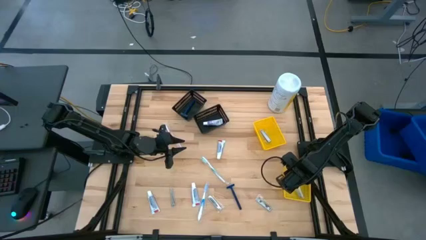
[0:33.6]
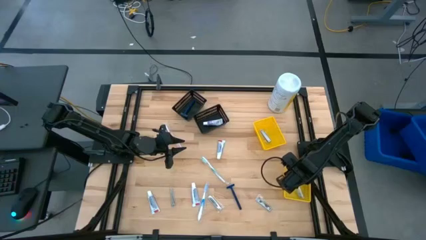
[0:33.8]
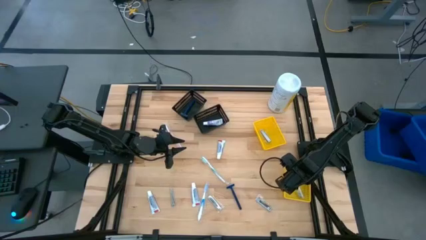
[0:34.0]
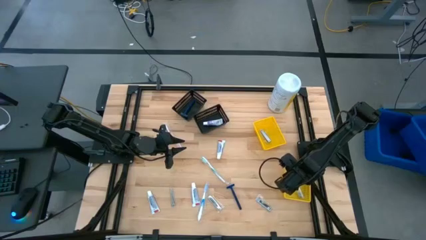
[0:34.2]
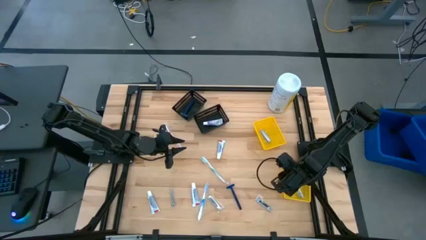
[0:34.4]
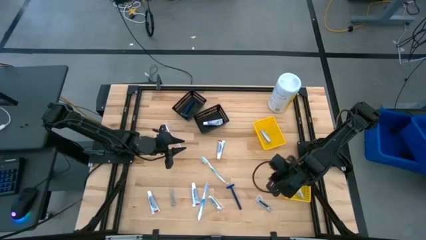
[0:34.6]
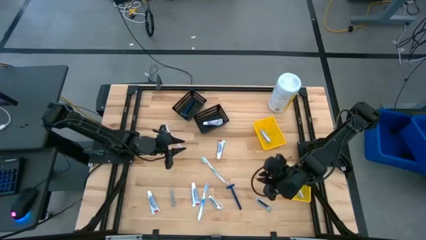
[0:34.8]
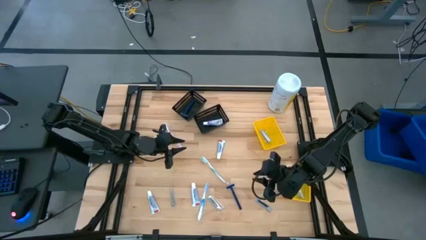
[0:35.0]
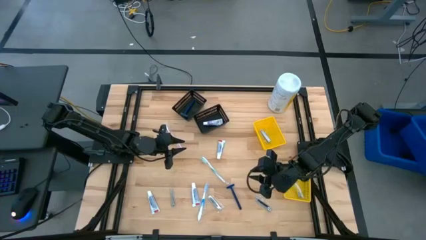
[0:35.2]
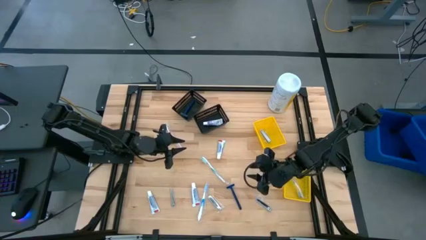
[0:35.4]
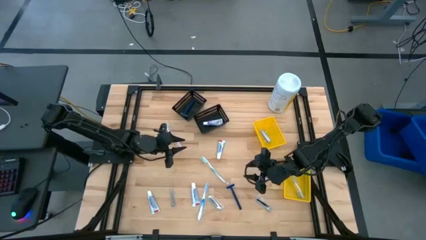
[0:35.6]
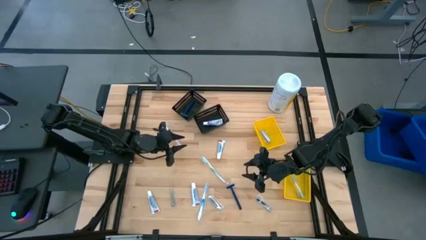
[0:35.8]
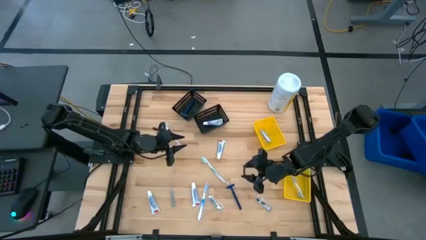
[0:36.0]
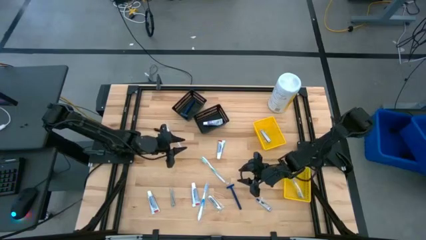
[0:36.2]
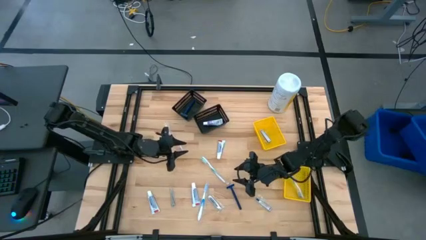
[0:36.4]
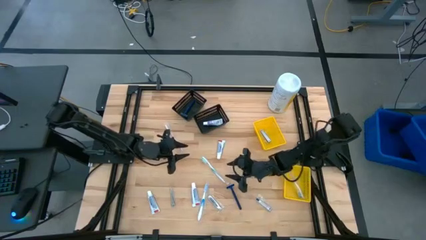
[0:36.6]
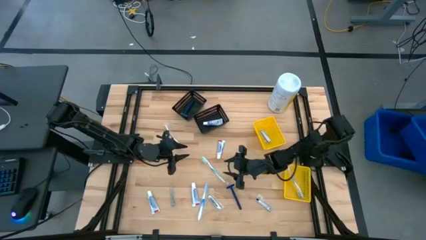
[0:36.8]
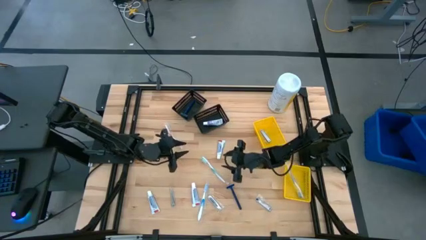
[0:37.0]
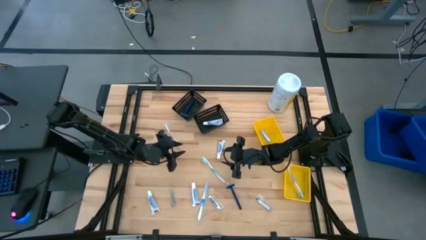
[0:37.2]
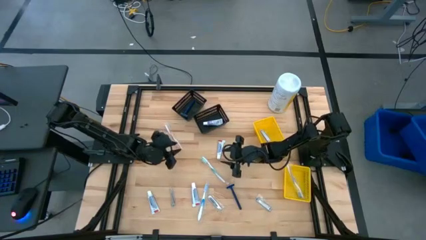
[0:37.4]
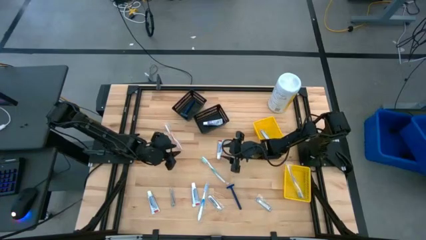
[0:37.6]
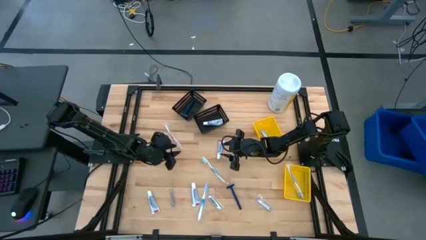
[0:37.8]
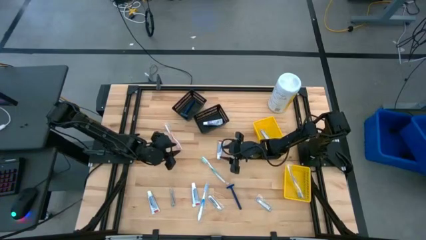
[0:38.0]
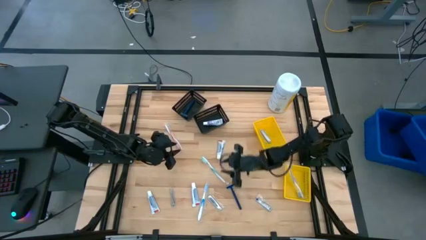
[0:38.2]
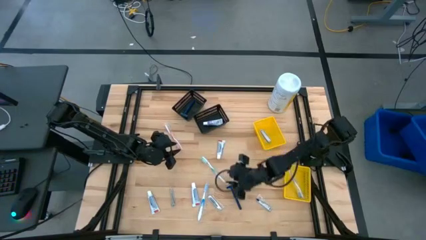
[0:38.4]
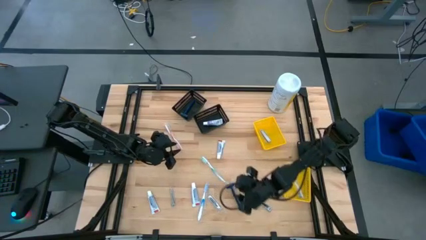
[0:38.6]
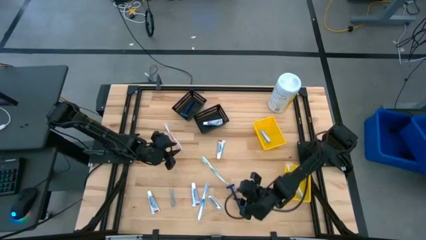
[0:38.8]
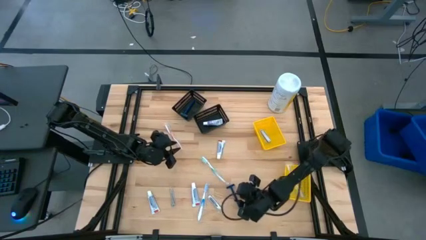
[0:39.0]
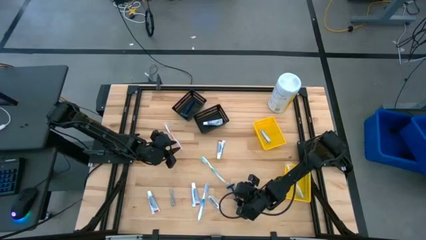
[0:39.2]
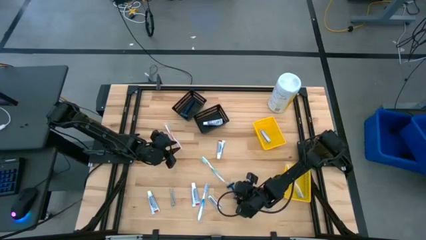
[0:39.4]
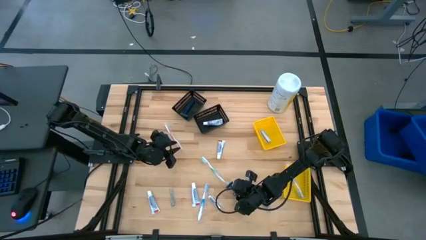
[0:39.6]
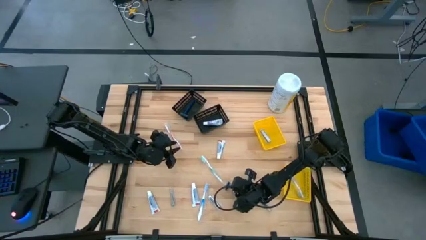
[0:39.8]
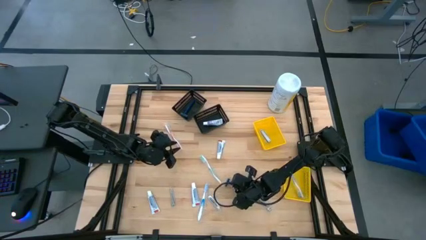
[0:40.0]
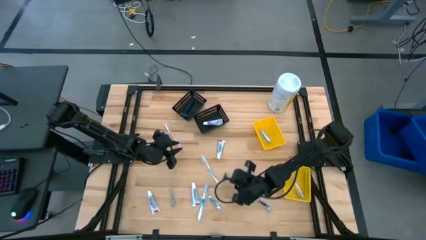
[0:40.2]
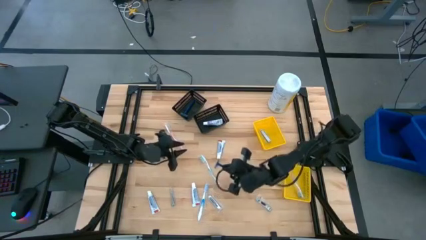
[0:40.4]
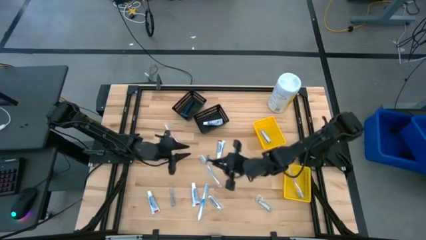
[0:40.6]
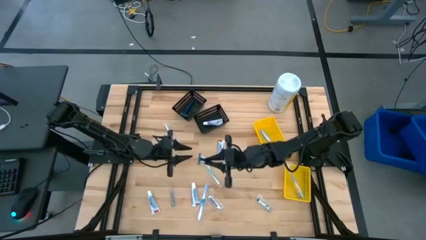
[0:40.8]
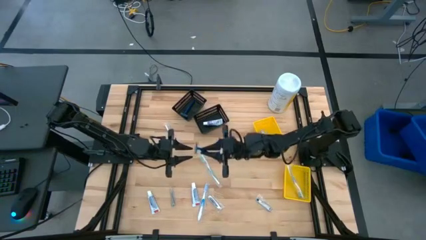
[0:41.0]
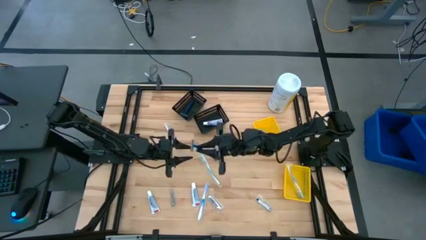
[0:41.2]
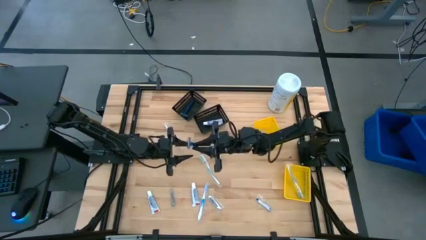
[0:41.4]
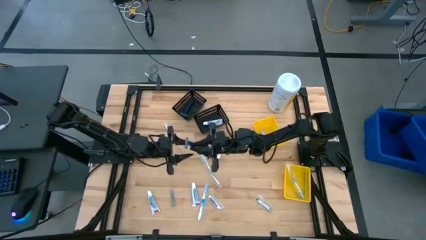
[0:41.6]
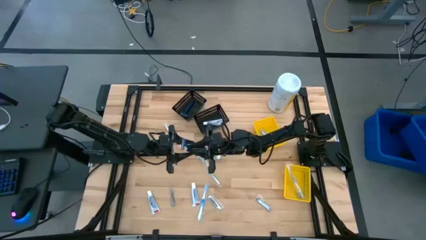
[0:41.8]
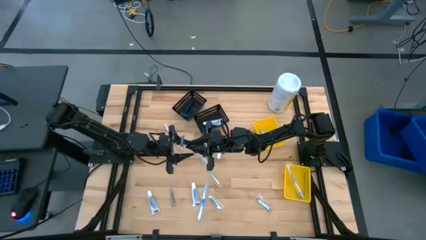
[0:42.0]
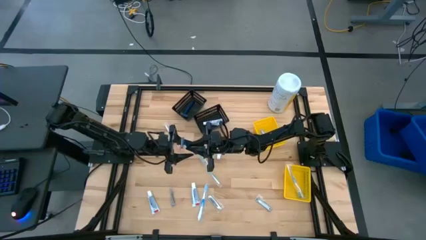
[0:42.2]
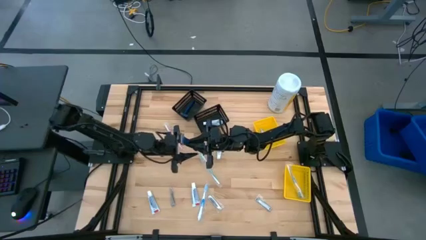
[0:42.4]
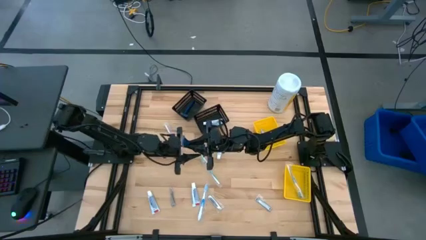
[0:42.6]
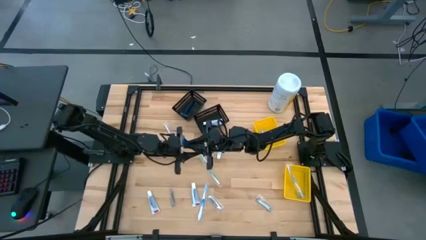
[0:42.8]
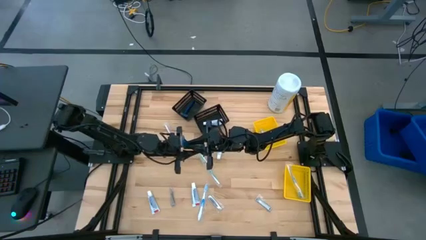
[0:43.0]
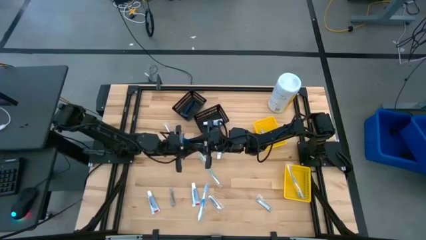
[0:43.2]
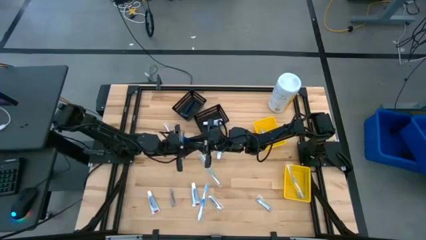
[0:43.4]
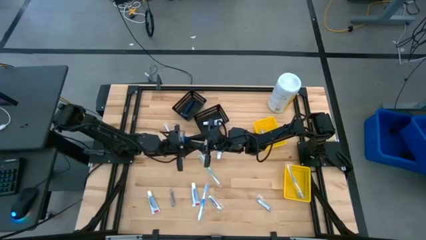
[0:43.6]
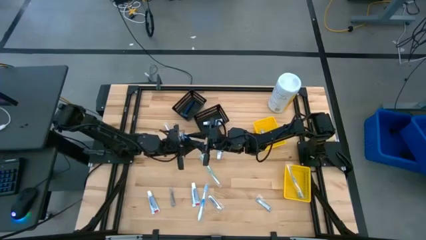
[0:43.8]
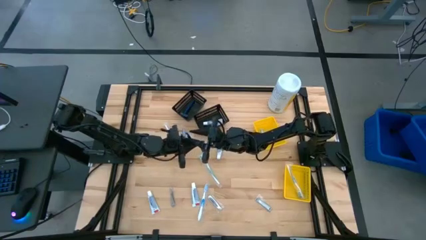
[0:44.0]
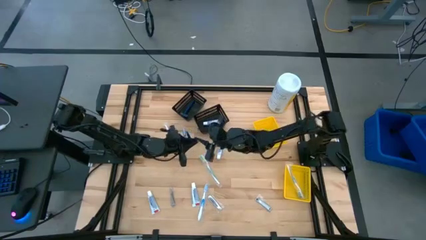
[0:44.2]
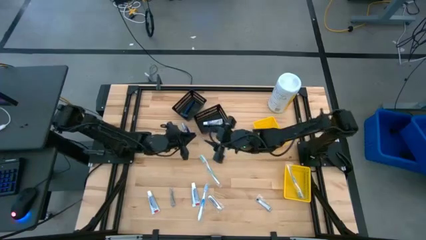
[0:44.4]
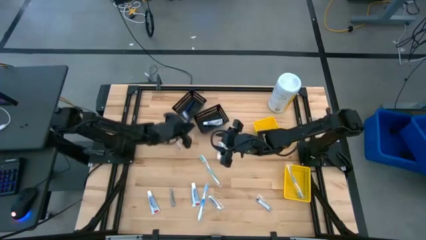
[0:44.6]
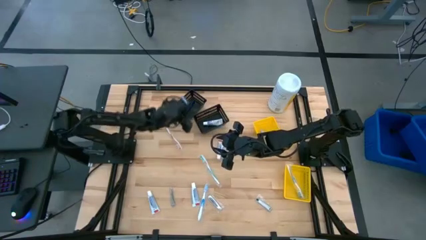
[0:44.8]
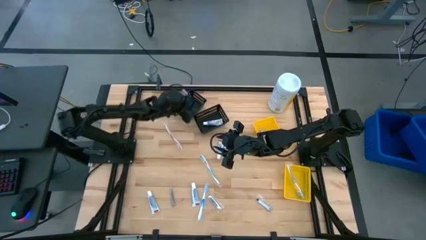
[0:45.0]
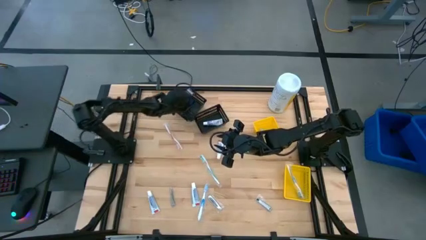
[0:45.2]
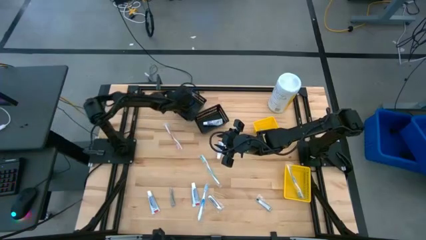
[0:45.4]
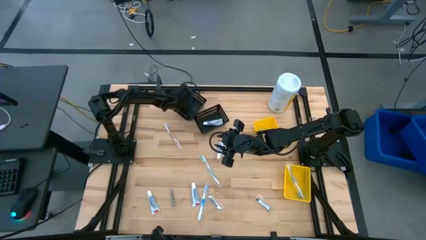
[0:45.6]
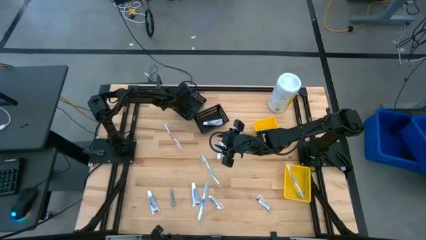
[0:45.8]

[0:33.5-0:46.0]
Task: Pick & Place Travel size toiletries
Put the razor into the top black bin

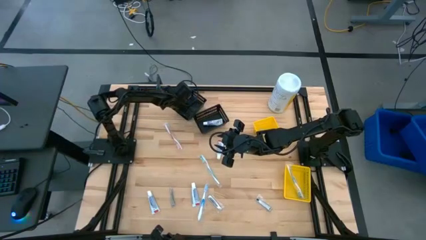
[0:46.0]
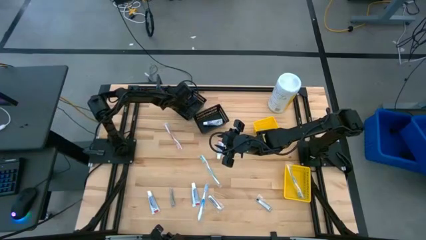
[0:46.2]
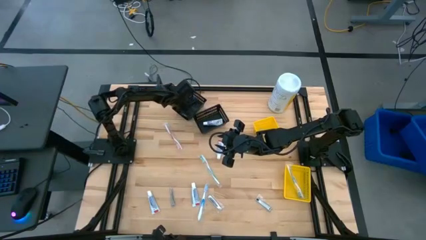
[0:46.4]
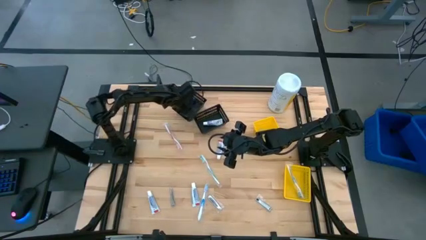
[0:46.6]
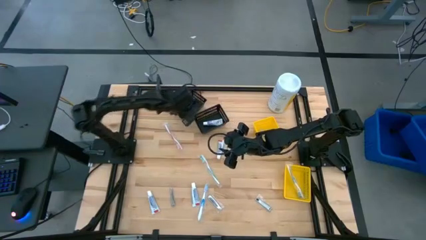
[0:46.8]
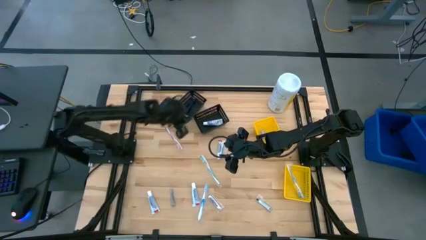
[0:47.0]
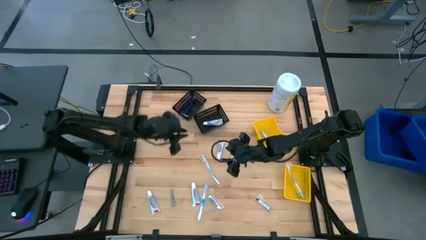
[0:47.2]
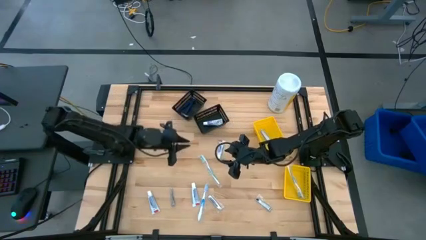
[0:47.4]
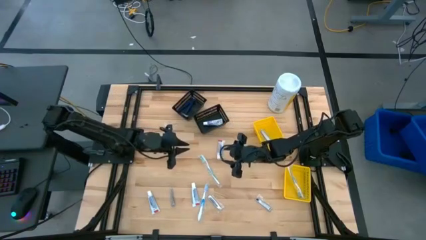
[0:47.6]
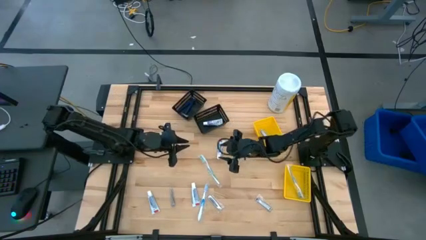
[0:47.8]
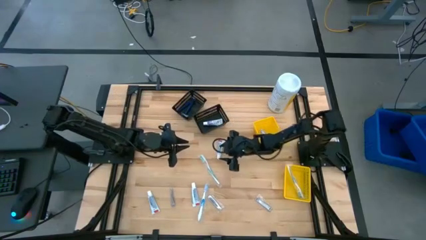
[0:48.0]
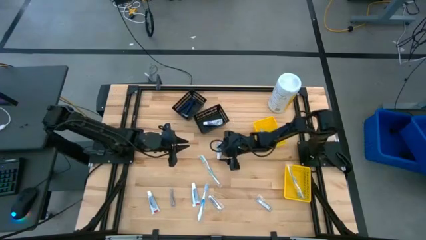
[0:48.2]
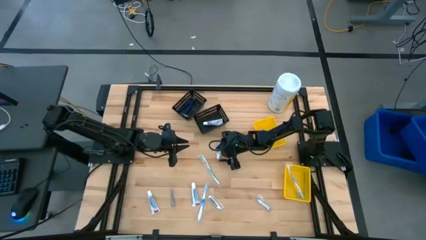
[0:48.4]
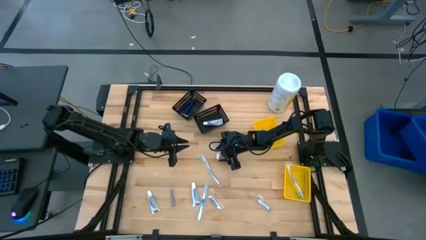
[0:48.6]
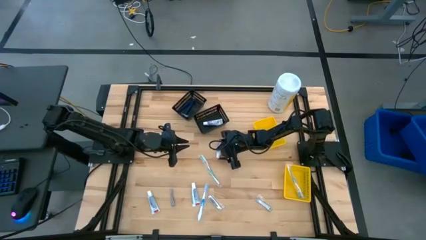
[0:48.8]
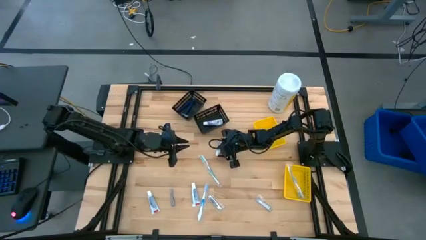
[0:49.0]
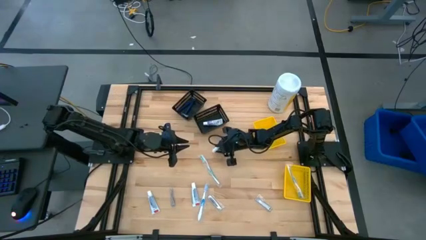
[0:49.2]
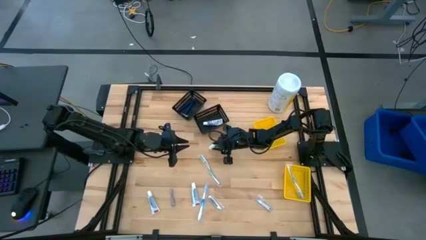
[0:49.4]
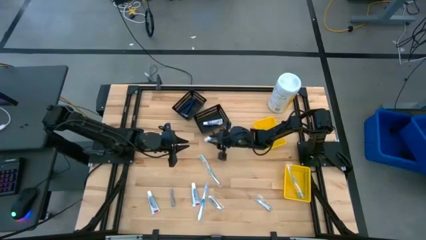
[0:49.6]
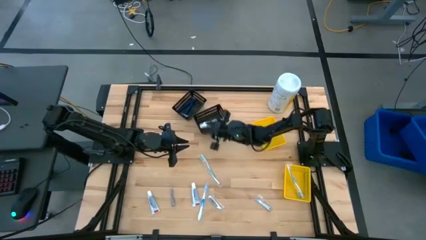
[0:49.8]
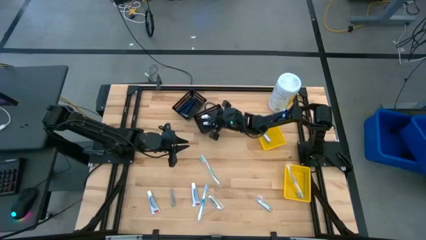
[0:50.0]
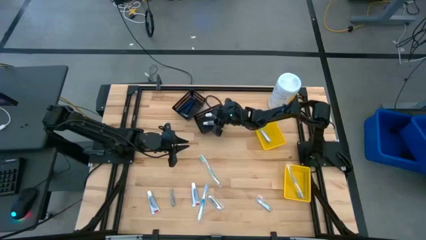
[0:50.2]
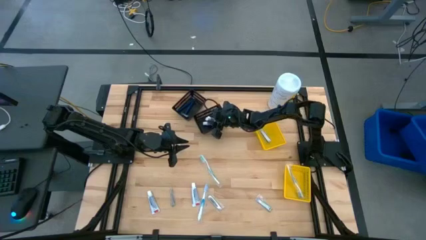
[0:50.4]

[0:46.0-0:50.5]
Put the toothpaste into the bottom black bin
